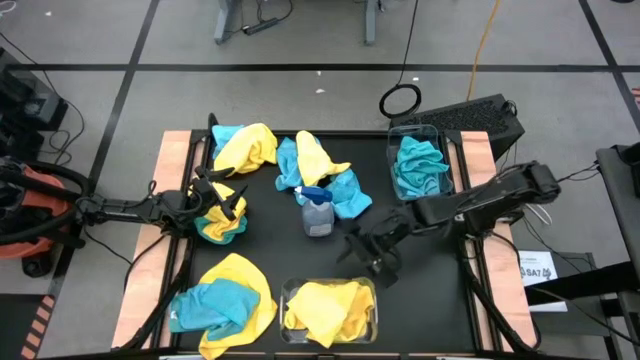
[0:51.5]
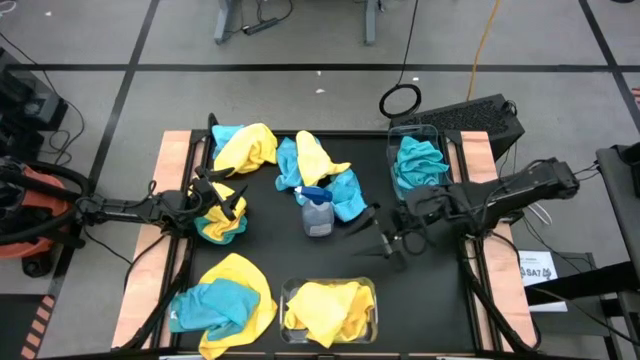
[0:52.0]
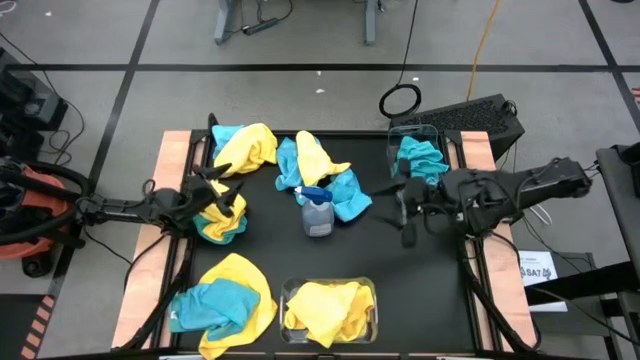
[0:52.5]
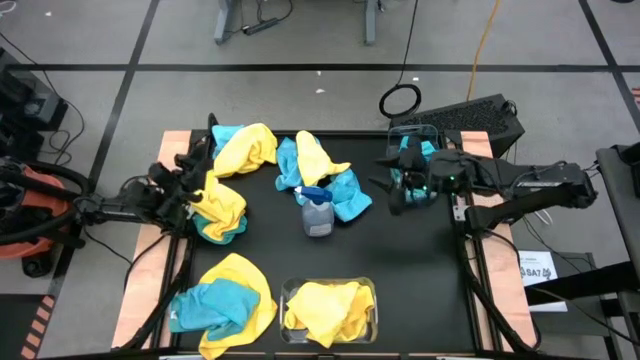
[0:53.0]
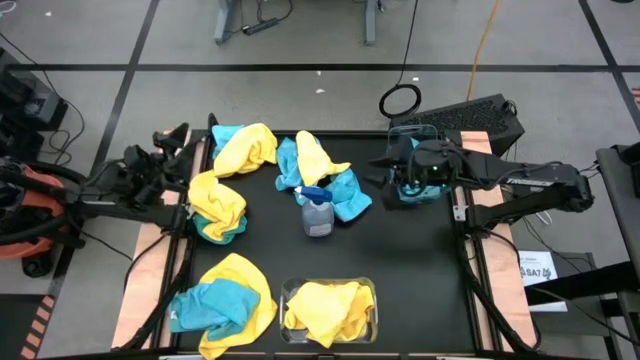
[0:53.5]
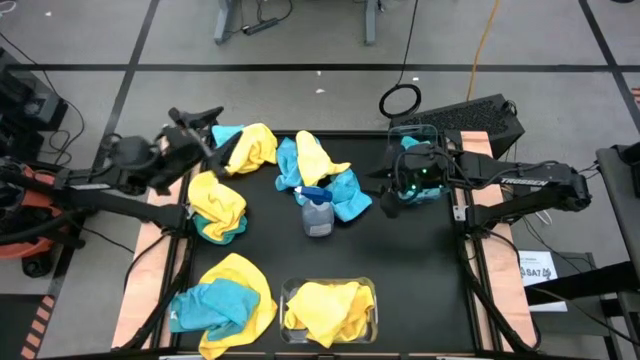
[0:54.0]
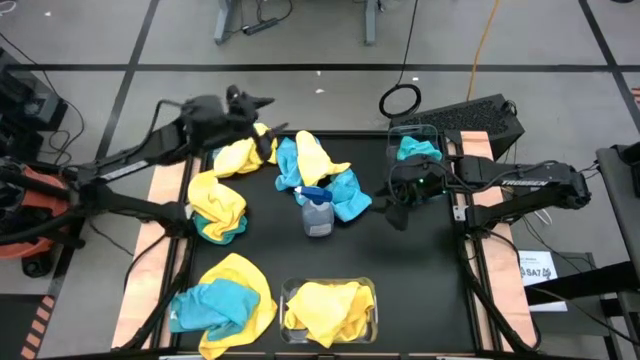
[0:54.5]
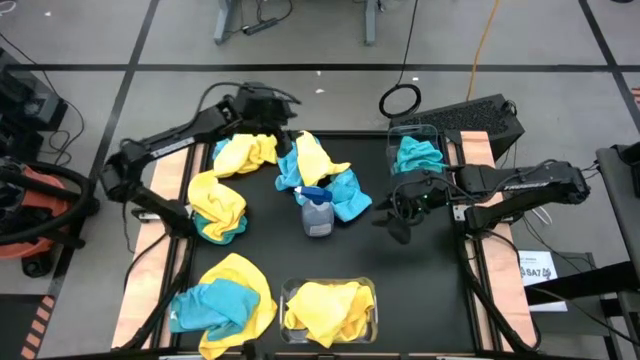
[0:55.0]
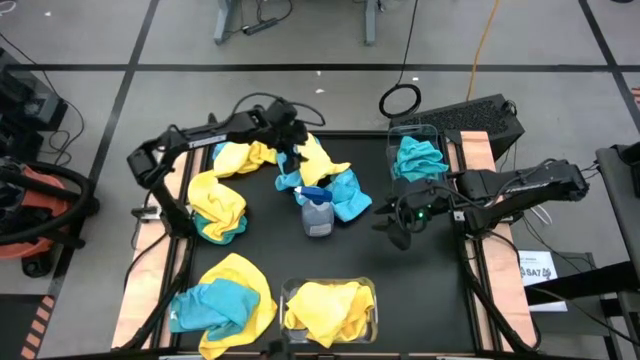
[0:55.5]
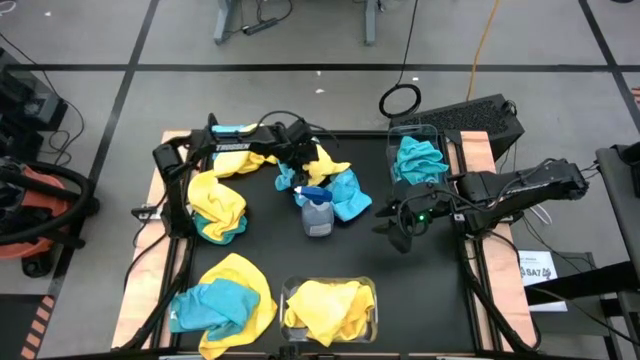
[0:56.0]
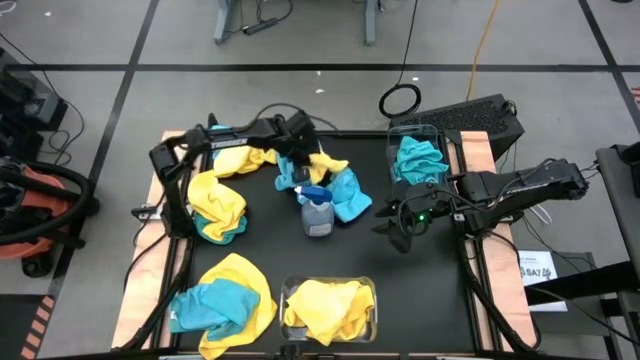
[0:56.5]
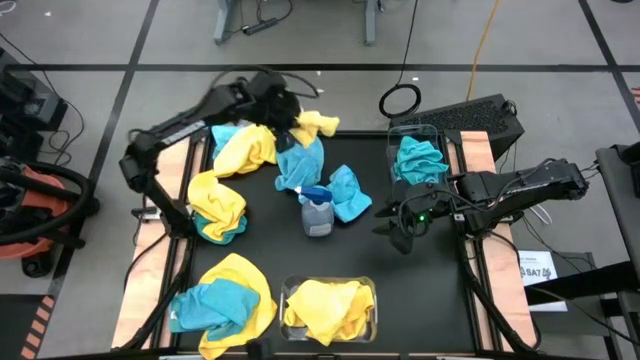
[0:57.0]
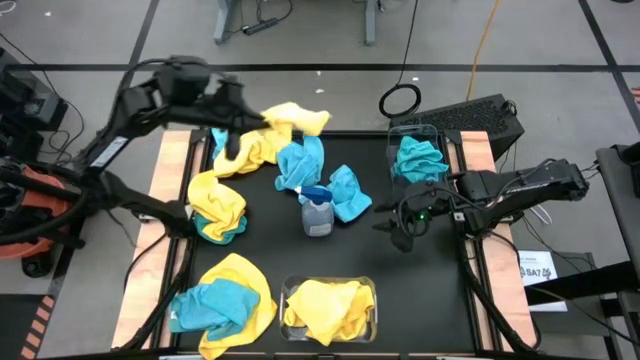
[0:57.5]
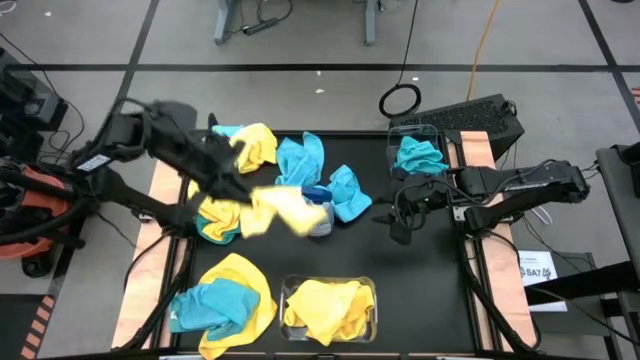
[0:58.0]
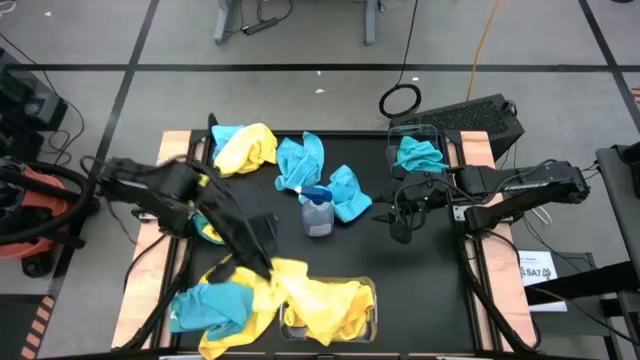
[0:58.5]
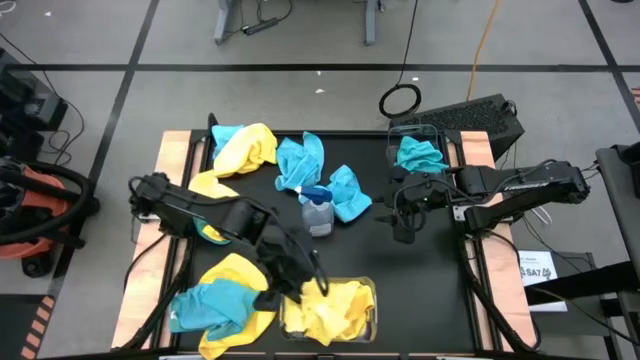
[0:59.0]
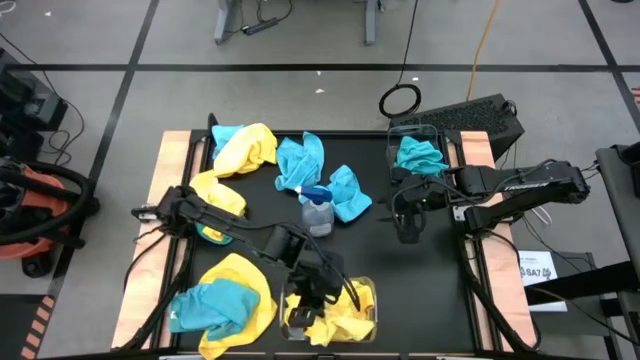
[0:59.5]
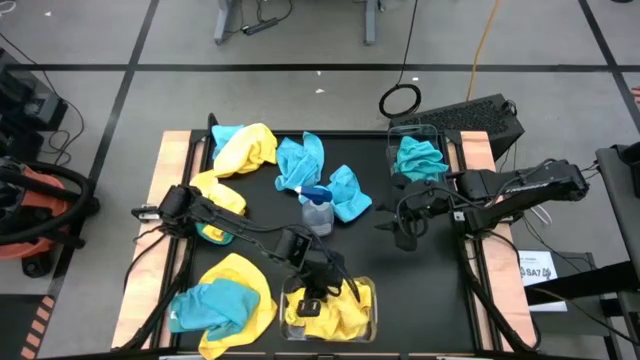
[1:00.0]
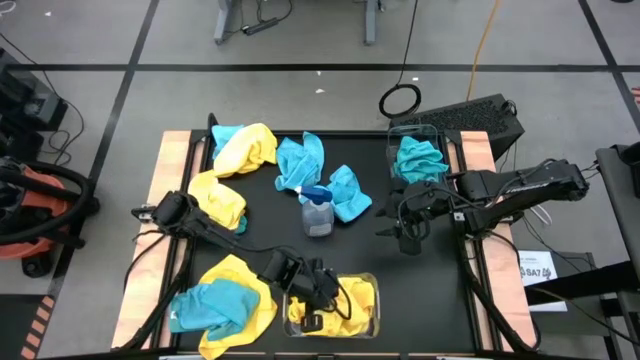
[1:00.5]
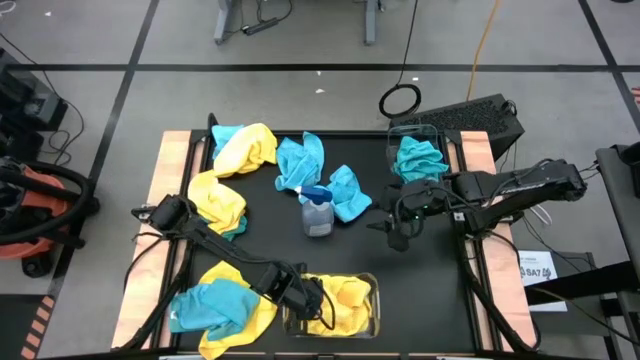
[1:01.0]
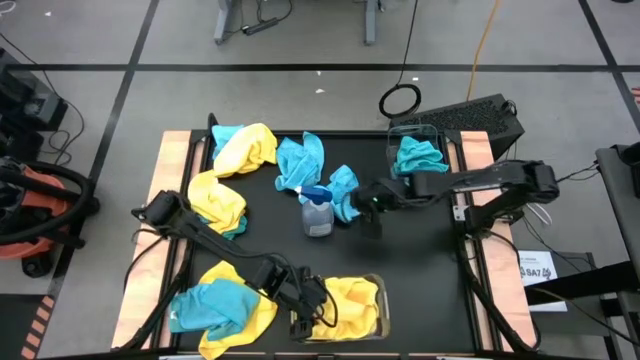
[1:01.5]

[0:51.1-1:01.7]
Task: Sort microfiber towel by color & place in baskets
Put the yellow towel into the bottom transparent bin

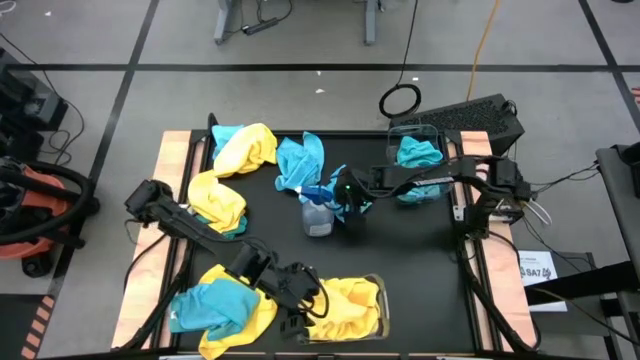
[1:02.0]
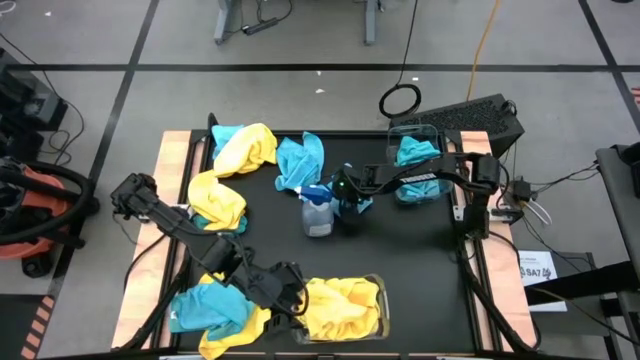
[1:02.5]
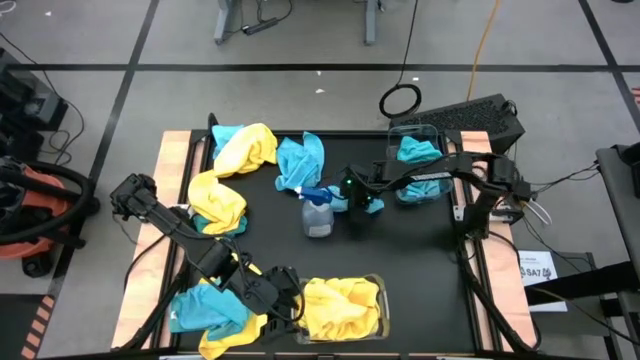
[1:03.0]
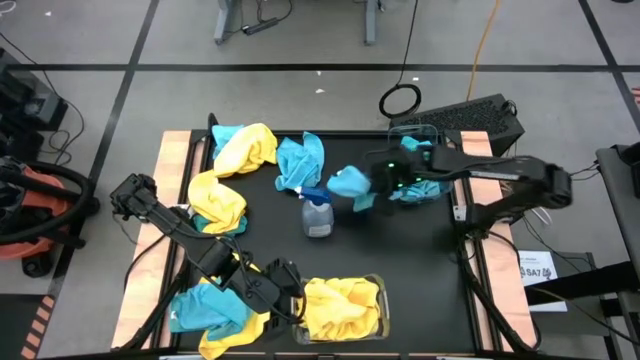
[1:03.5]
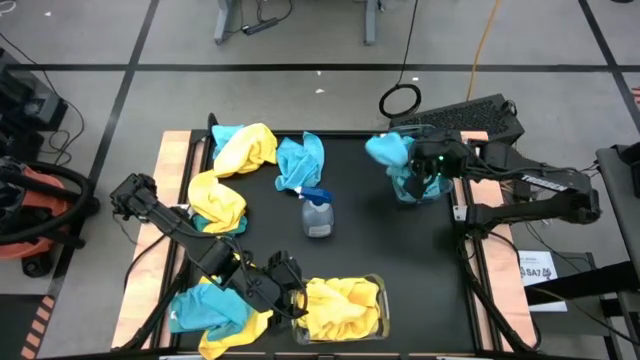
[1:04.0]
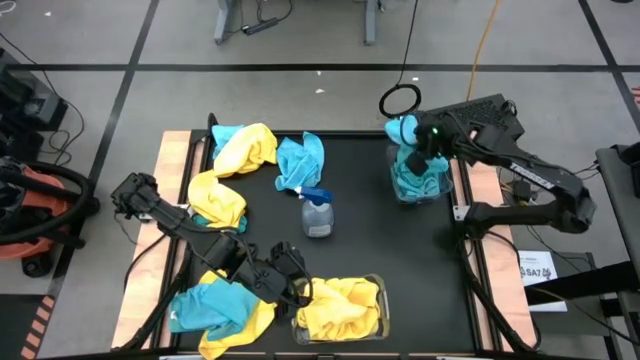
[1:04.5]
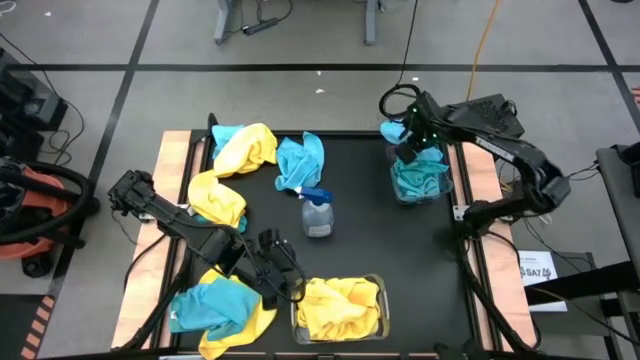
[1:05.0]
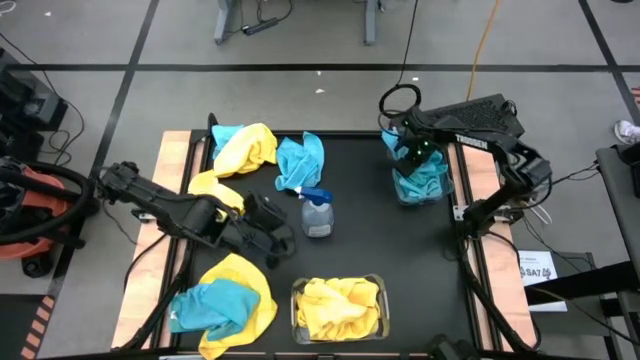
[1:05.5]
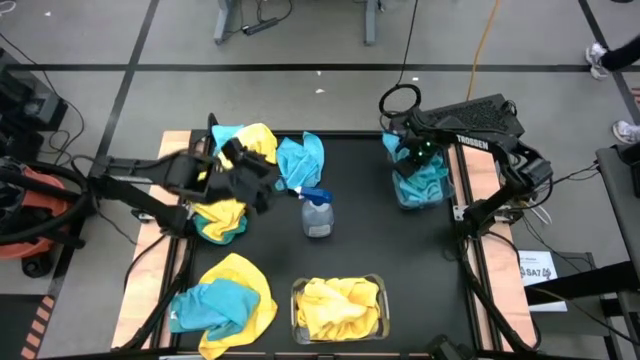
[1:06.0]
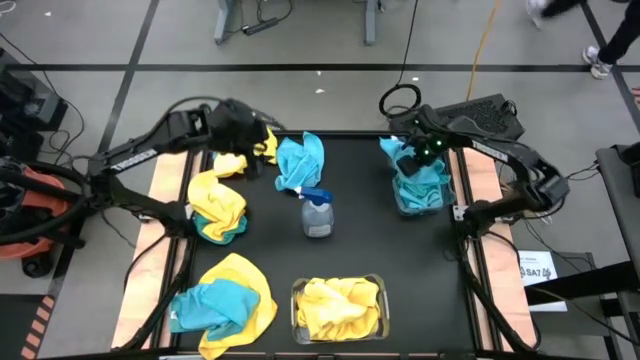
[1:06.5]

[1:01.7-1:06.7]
Put the blue towel into the top transparent bin

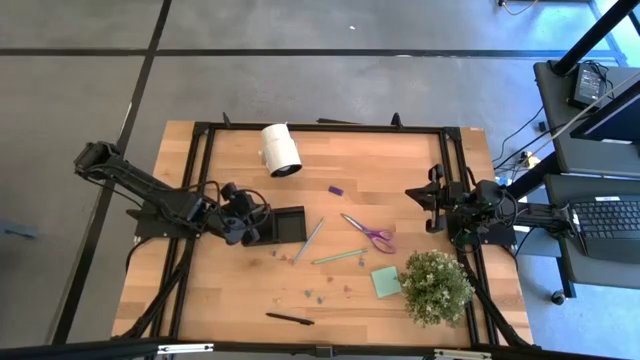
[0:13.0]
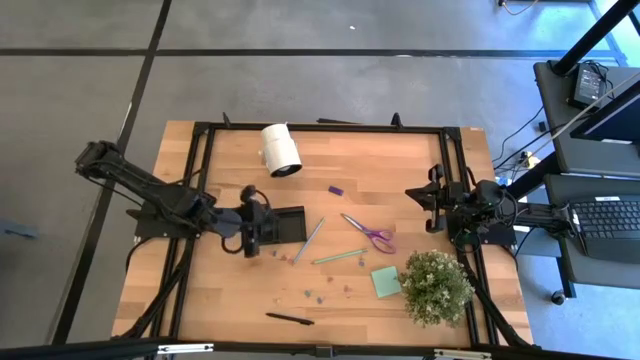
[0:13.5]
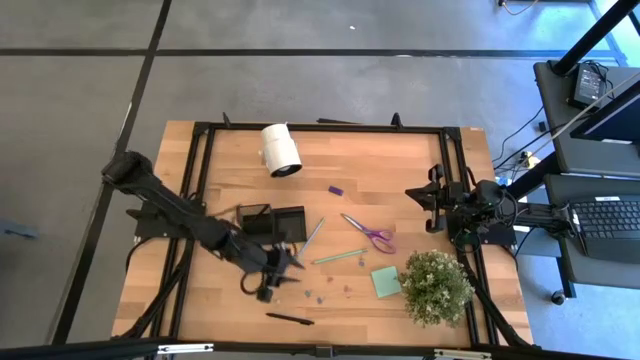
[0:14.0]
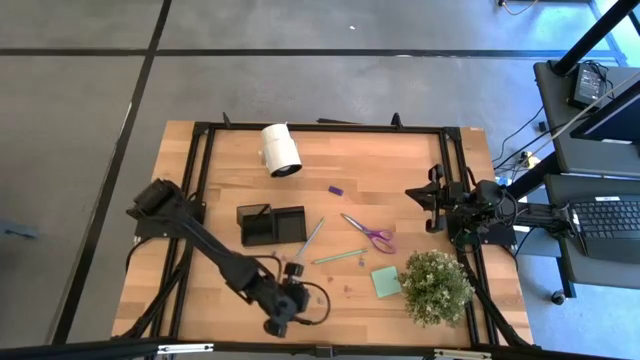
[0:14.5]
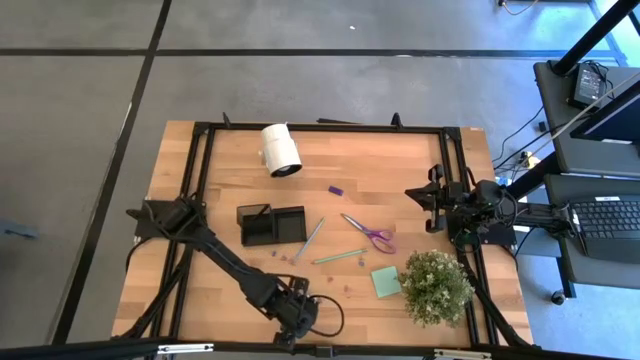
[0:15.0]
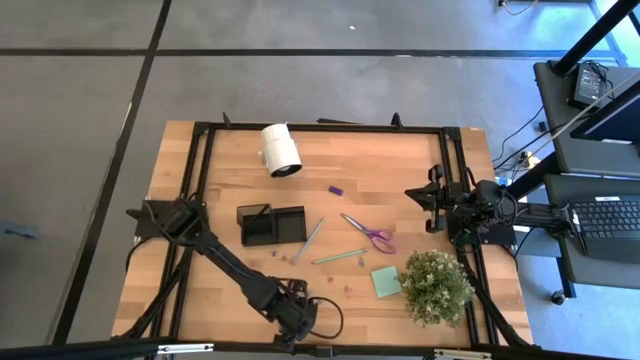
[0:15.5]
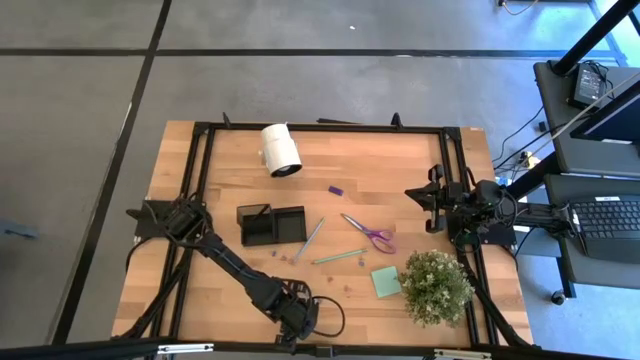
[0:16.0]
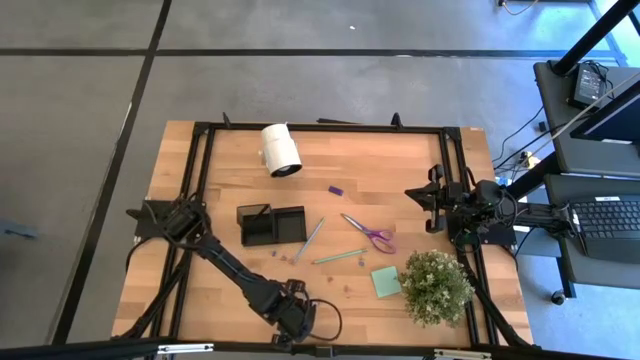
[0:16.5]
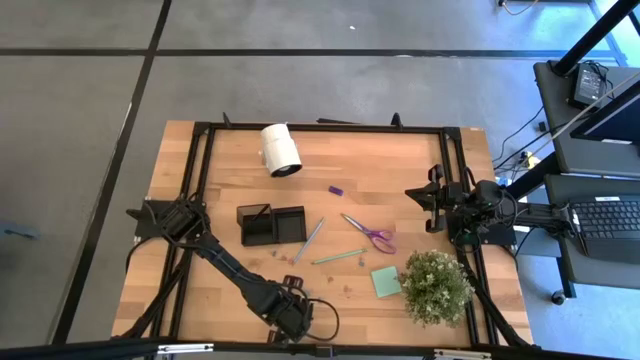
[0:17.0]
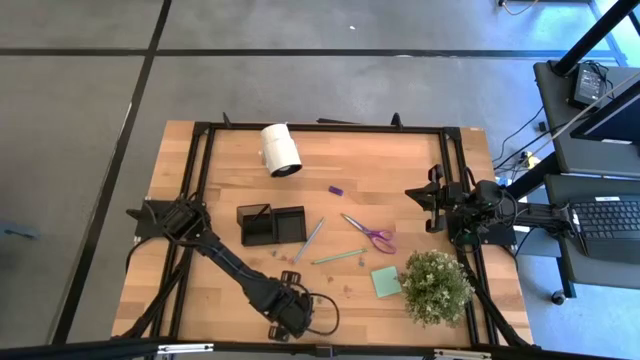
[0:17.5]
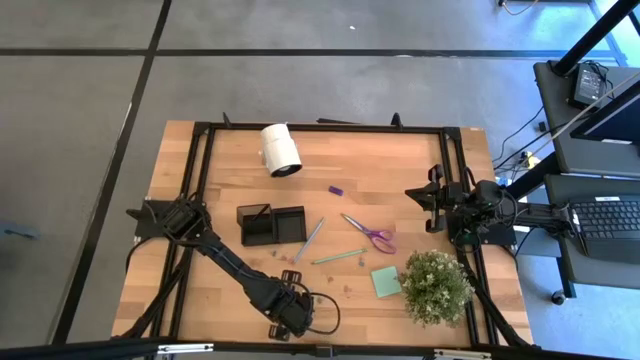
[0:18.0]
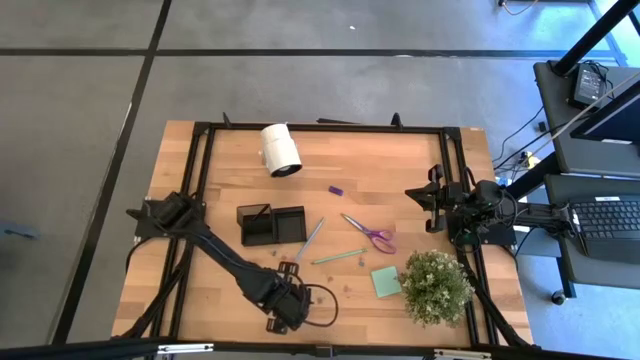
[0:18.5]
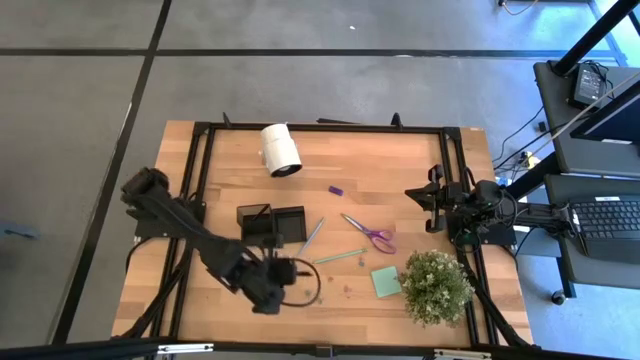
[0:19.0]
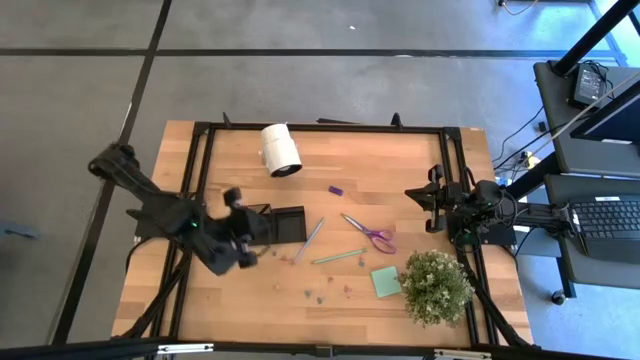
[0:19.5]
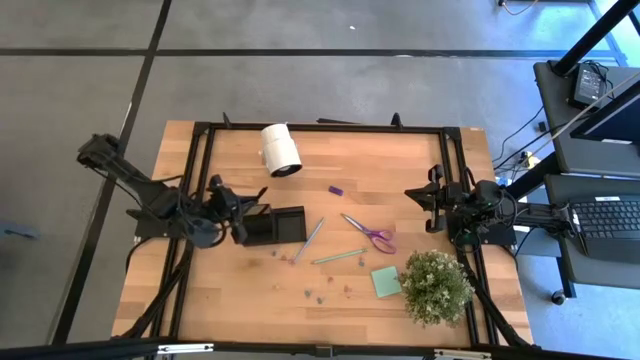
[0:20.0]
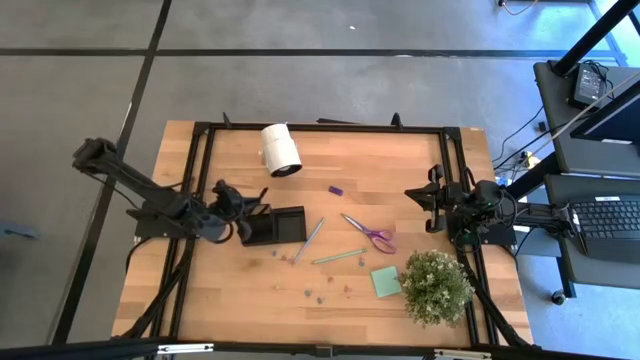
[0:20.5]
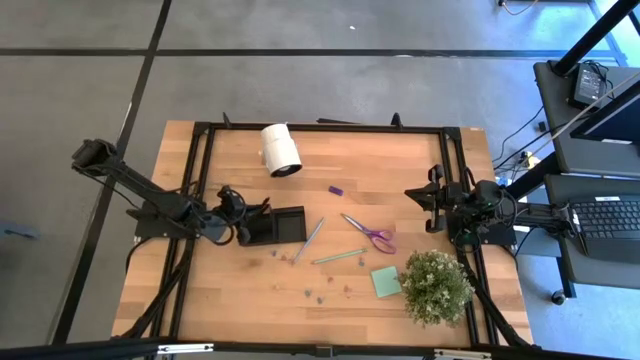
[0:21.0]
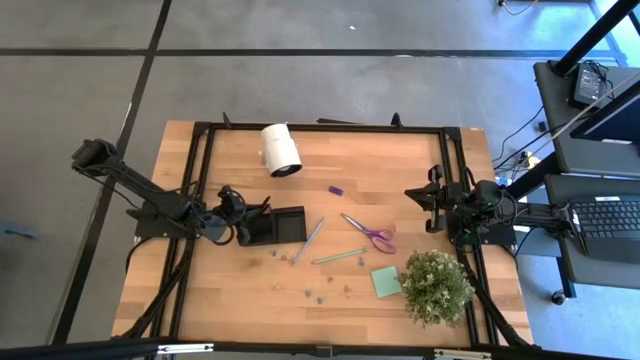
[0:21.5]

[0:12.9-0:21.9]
Task: Pick and place office supplies into organizer
Put the black pen into the black desk organizer
